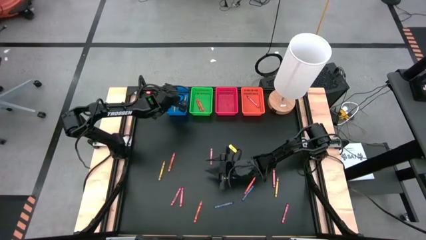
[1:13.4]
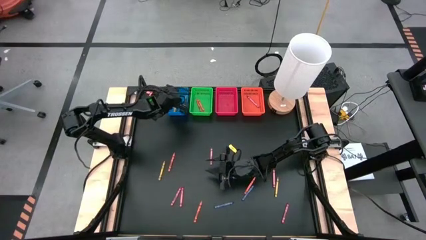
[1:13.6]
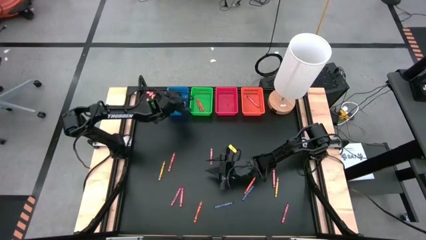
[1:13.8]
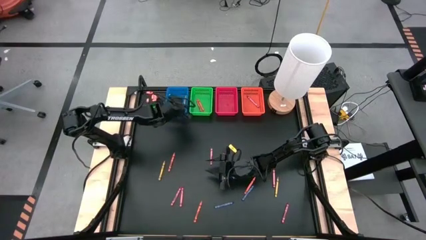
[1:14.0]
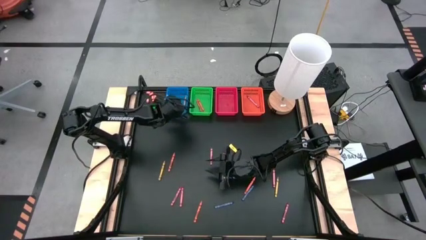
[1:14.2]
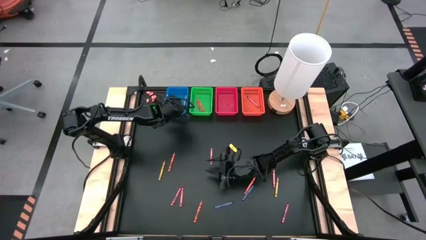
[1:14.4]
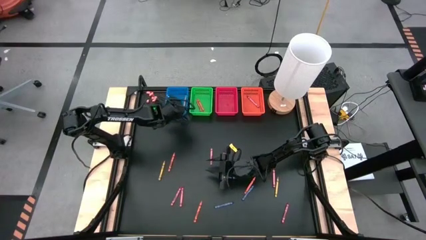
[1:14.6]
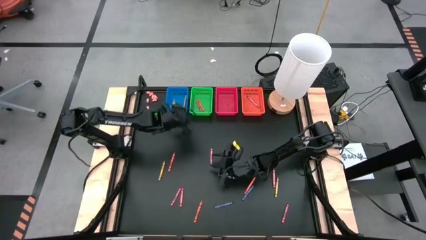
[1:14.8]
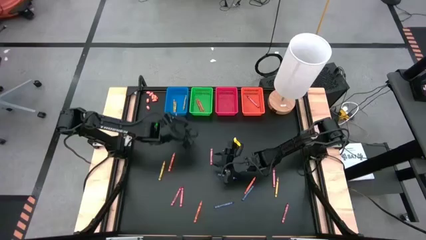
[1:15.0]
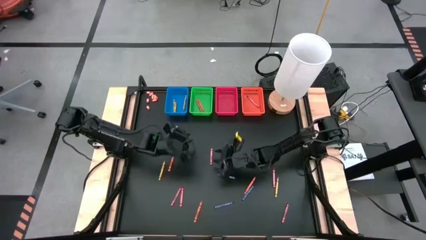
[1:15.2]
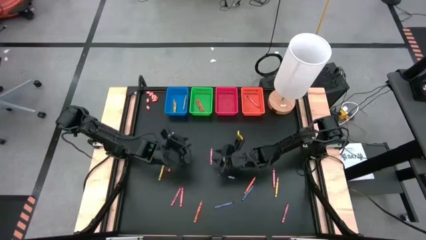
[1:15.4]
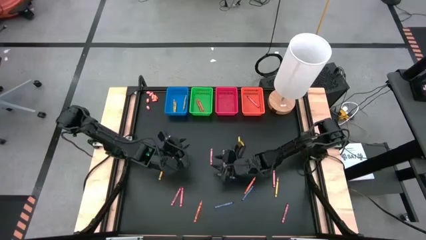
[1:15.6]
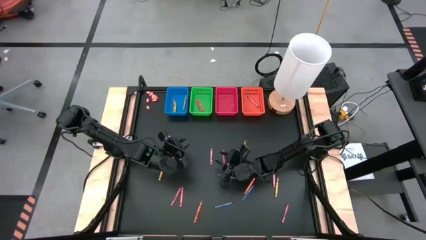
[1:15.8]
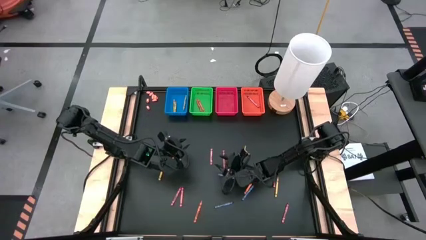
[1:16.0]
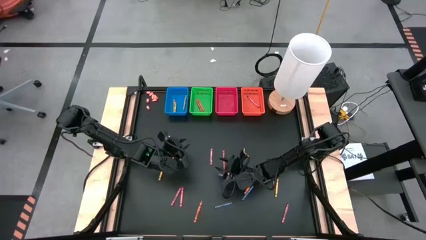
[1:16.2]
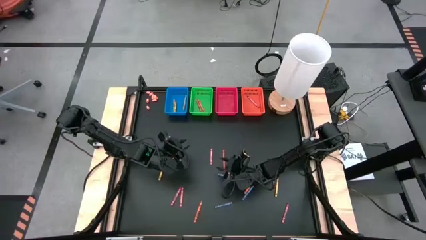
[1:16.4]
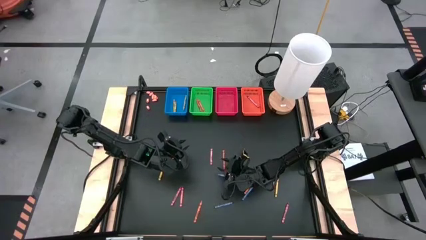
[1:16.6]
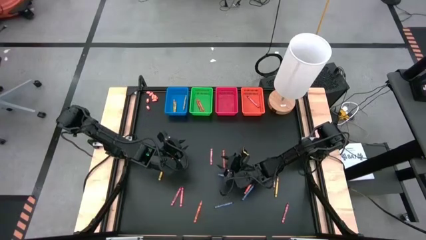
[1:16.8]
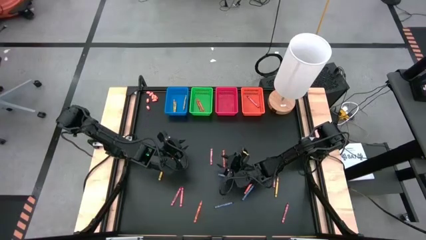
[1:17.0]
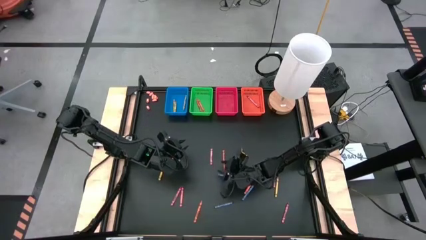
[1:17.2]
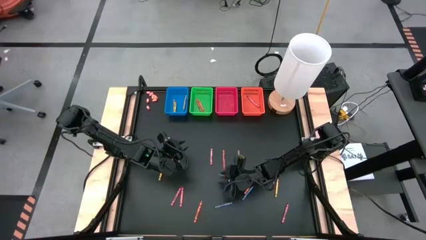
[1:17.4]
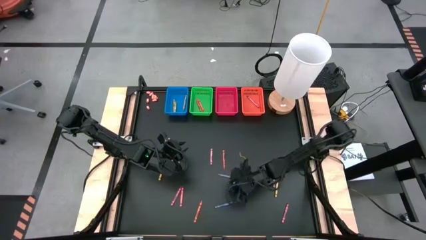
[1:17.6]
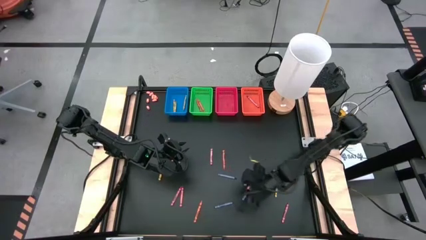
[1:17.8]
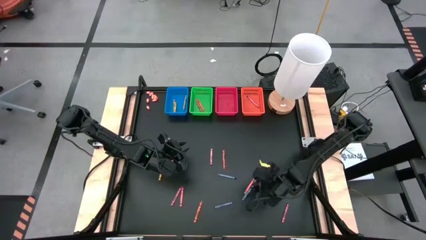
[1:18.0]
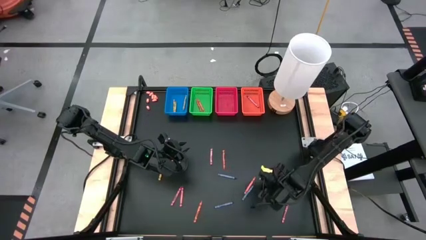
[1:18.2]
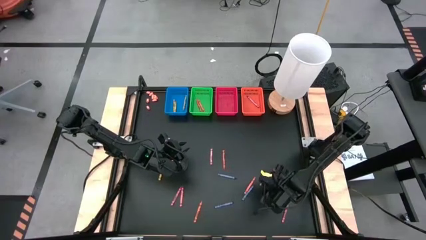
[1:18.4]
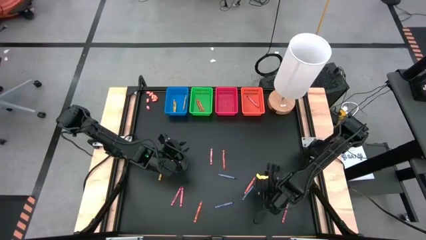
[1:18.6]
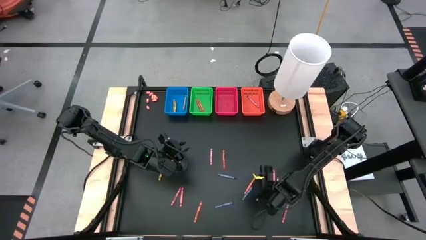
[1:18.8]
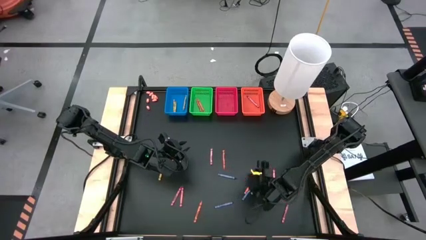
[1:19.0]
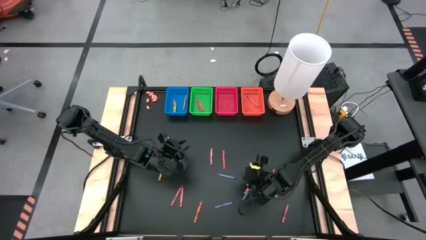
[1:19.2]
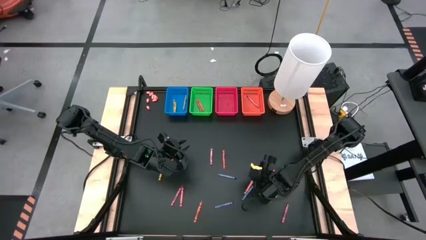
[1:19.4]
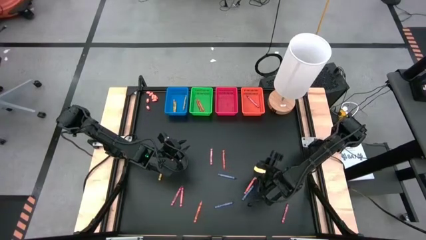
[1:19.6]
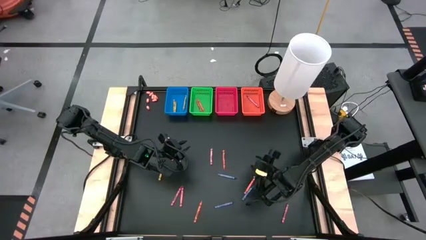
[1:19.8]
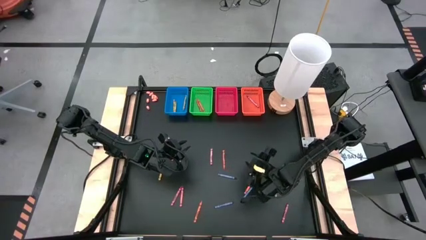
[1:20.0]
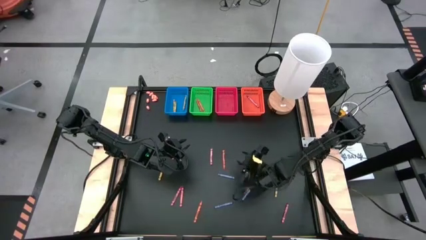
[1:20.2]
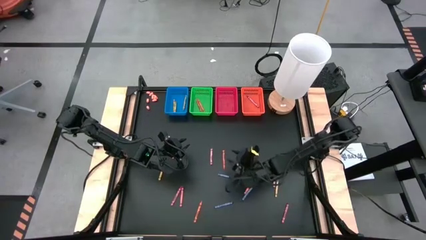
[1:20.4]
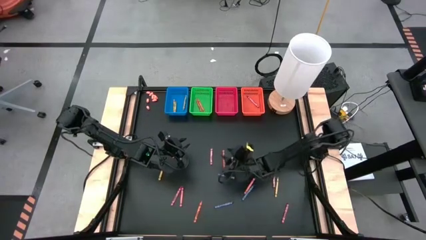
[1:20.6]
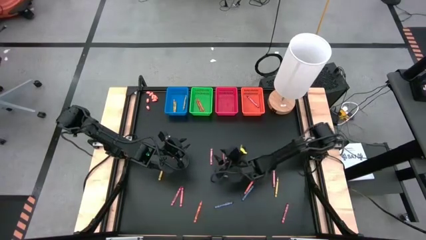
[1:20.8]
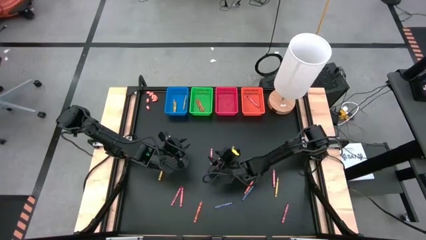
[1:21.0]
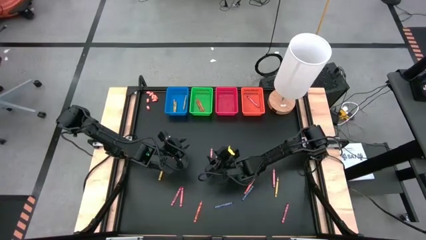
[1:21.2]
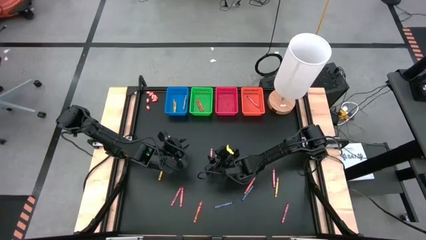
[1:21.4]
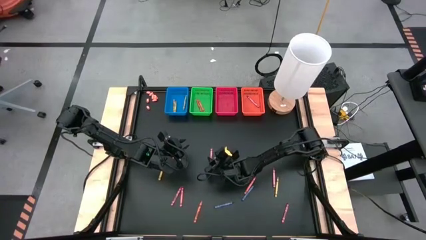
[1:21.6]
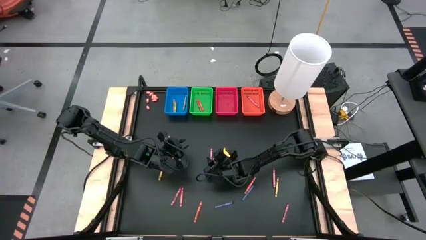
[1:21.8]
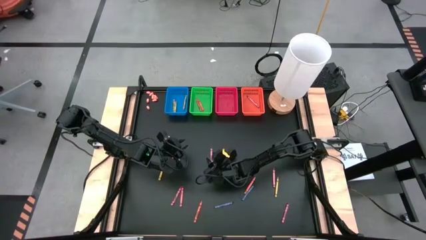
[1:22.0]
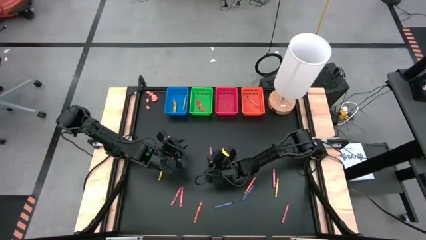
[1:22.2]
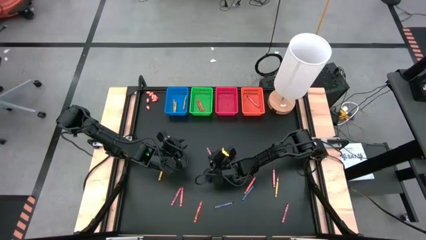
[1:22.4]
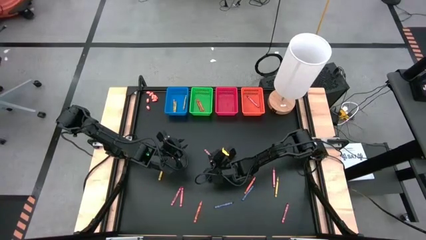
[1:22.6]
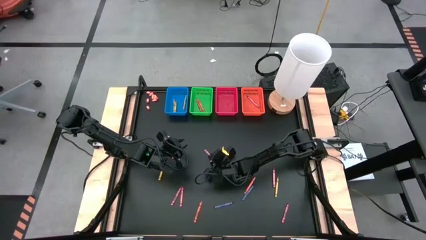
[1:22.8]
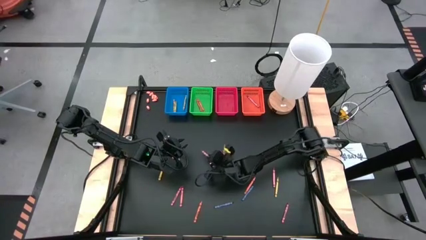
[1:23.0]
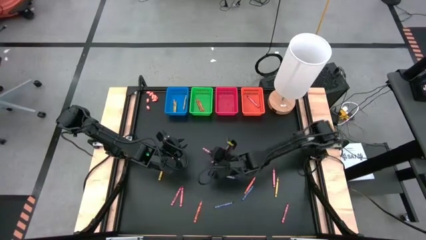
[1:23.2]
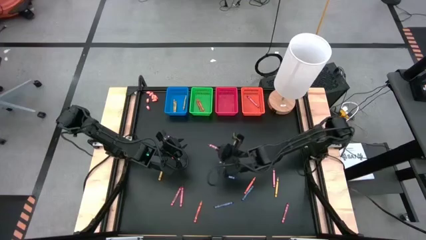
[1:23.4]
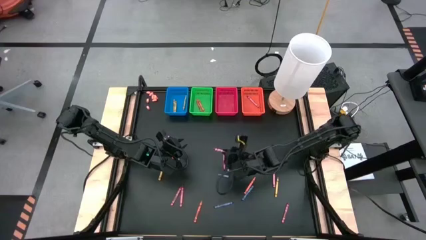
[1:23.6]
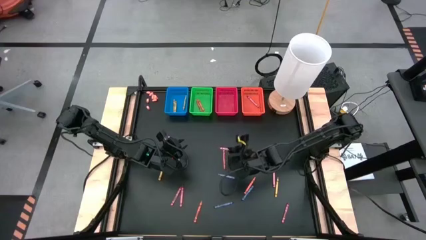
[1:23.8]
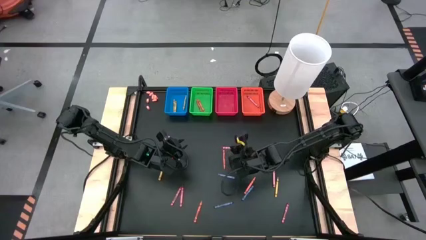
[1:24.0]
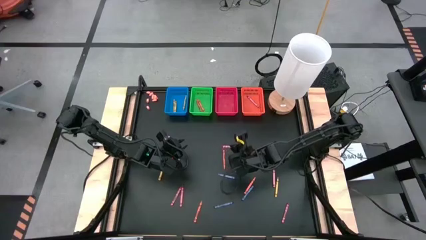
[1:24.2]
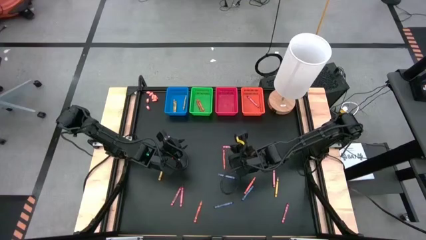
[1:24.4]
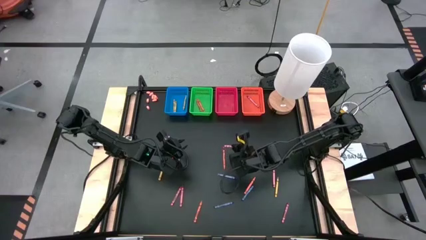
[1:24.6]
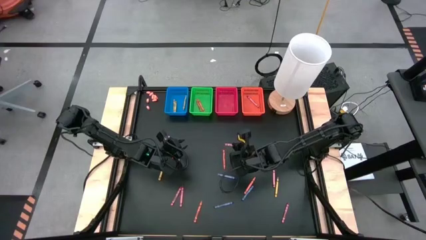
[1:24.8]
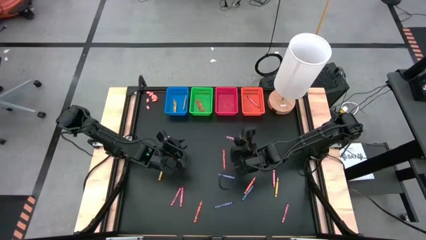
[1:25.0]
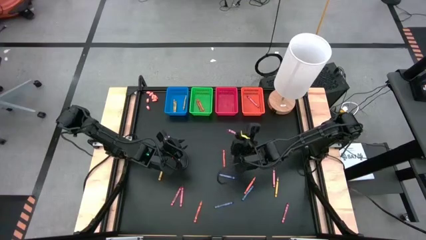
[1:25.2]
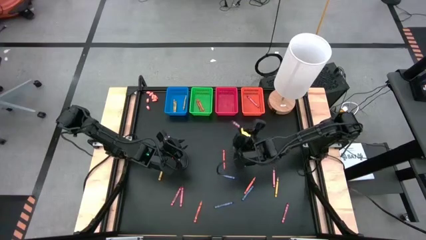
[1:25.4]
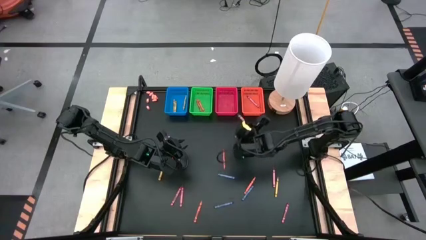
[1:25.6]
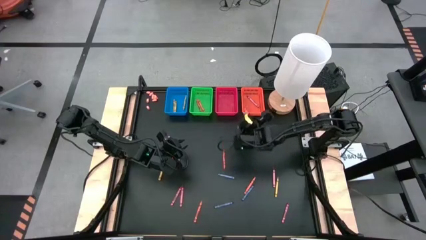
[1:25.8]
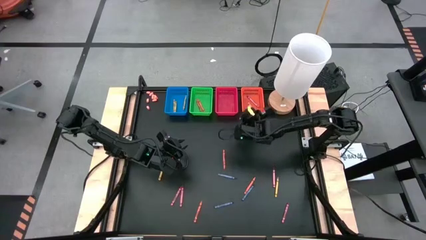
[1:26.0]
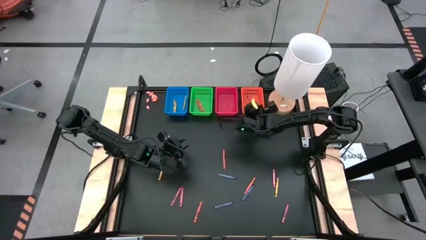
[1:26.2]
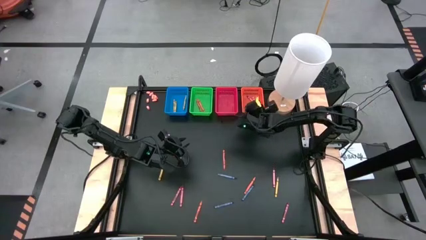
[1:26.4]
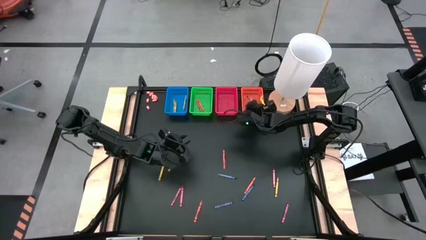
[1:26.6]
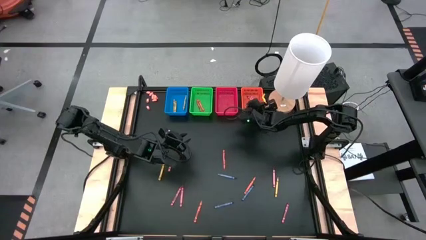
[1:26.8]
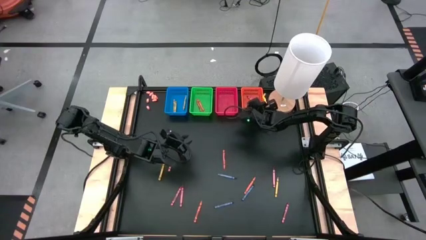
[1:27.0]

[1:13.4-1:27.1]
Task: Sort crayons
Put the red crayon into the orange bin

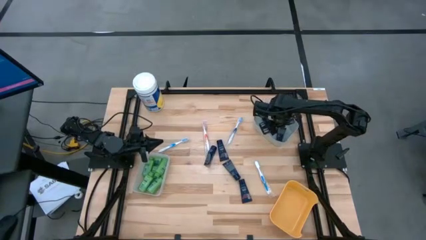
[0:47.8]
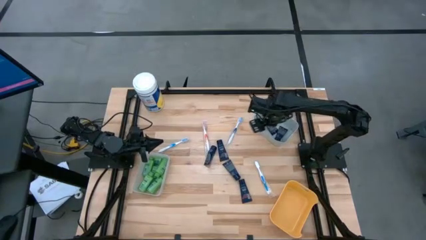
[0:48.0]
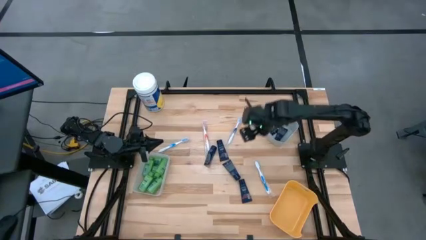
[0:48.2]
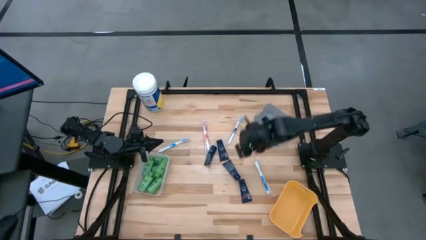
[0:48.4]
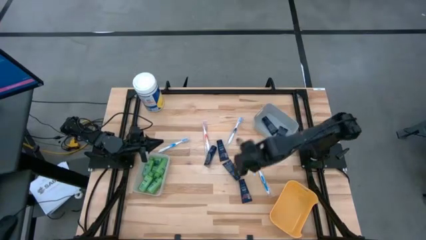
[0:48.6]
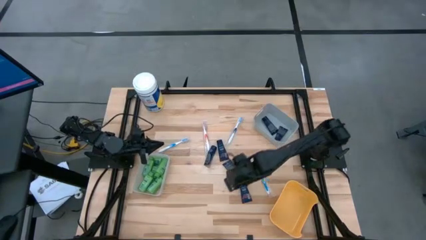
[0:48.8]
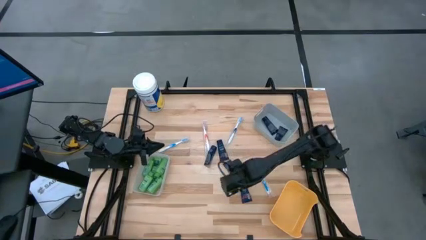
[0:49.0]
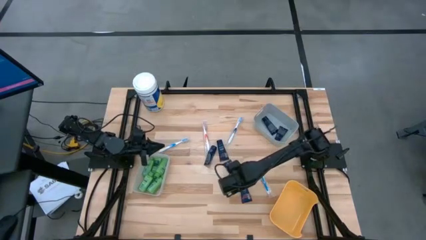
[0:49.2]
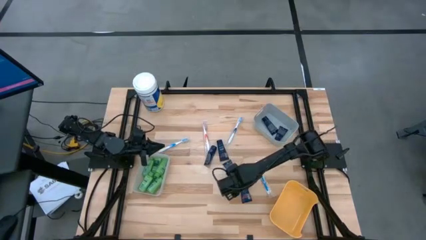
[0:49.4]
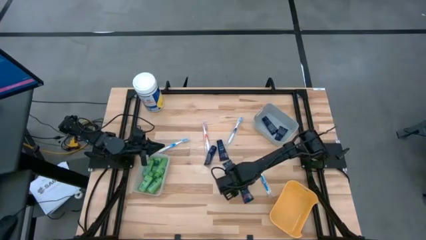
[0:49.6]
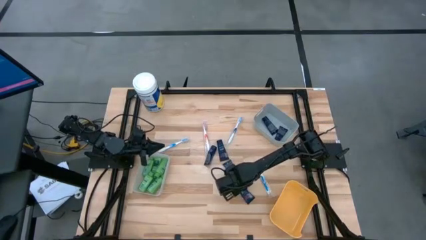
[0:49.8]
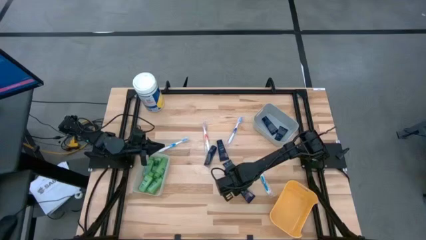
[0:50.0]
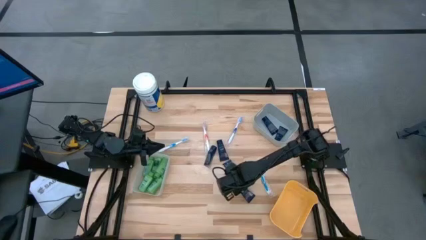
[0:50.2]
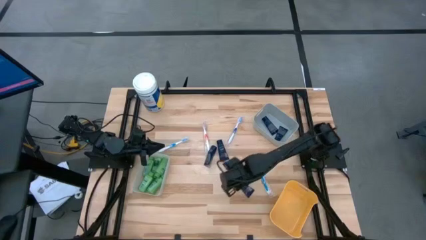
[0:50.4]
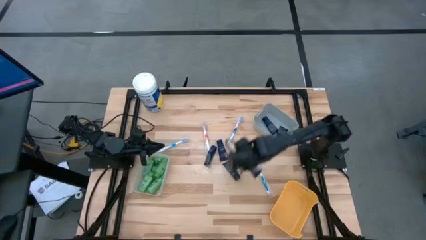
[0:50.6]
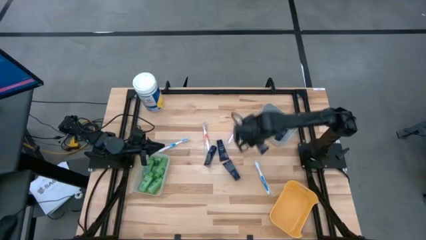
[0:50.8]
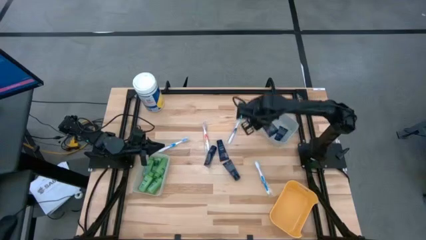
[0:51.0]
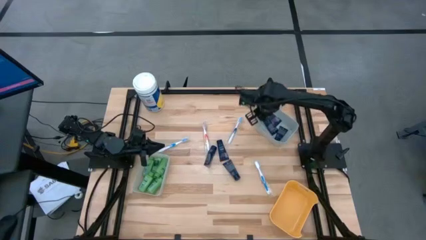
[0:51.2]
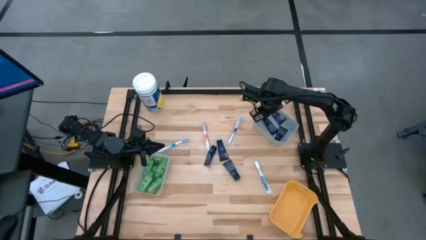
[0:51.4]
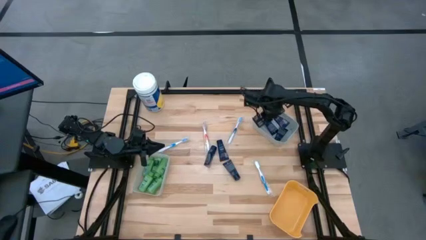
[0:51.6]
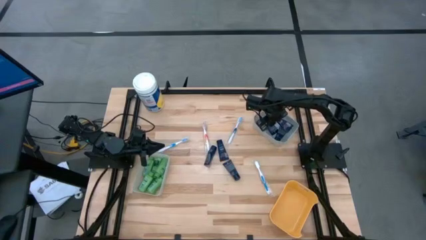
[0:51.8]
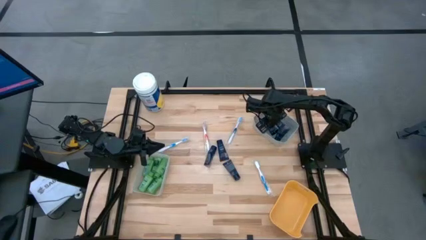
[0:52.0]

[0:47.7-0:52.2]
Task: Pick & Place Travel size toiletries
Put the blue shave cream tube into the gray bin
